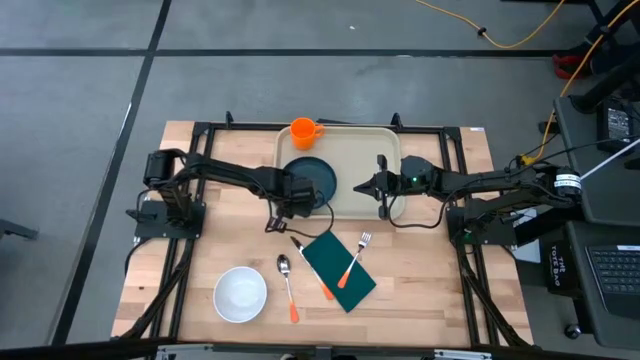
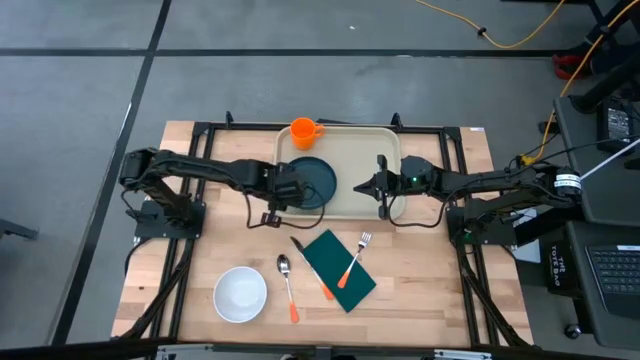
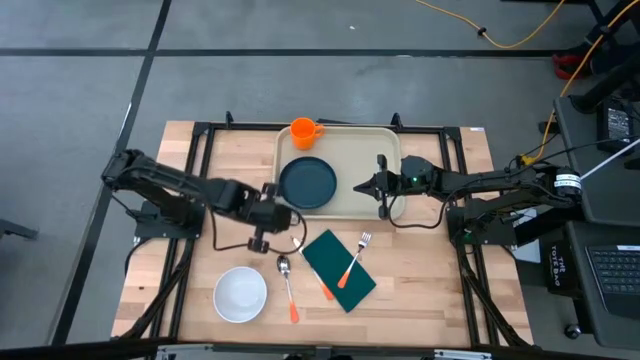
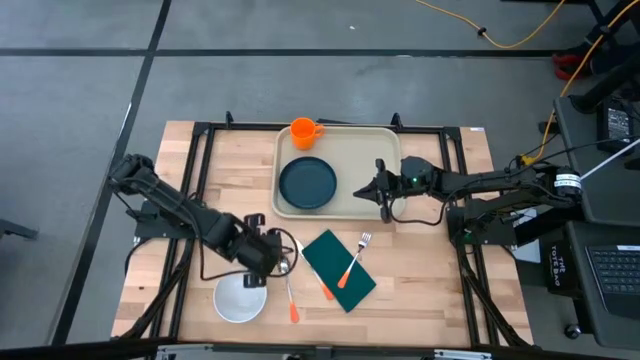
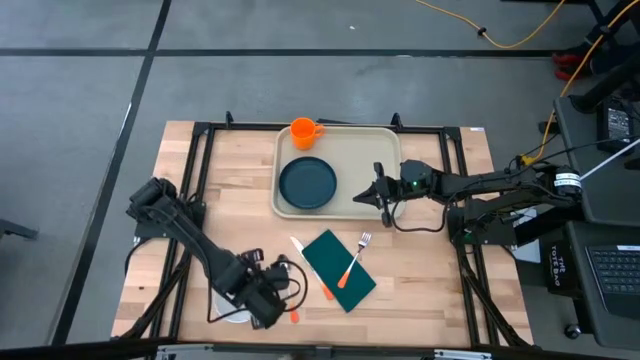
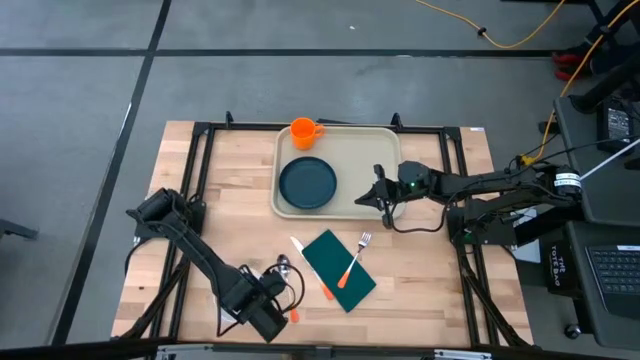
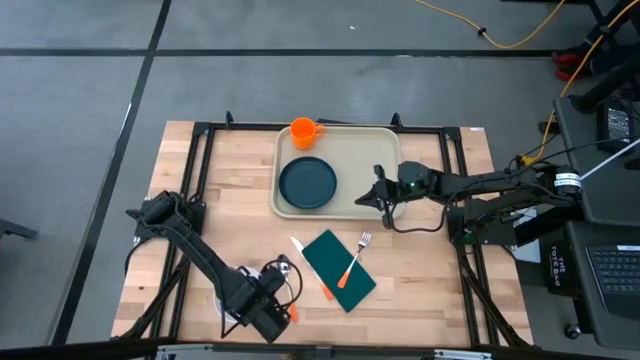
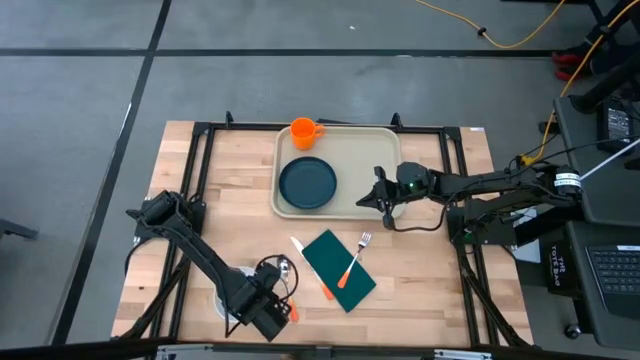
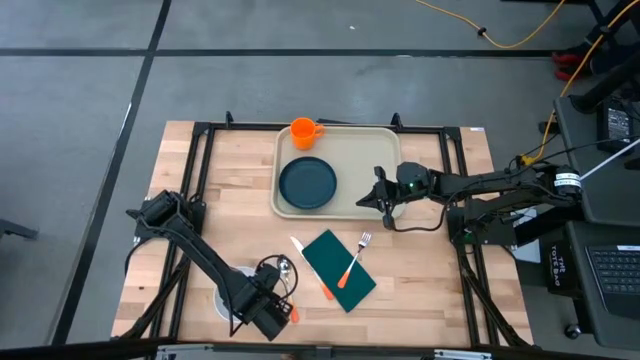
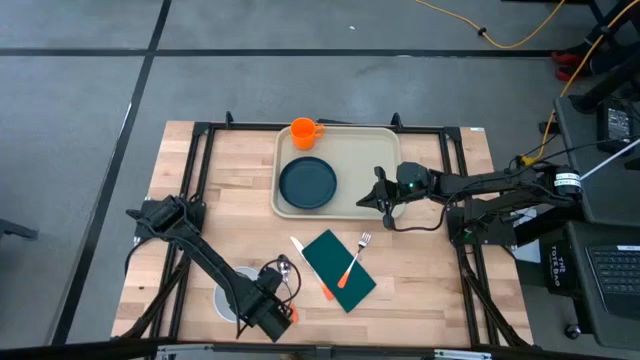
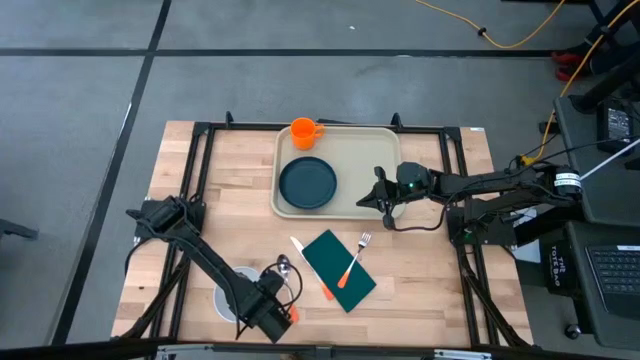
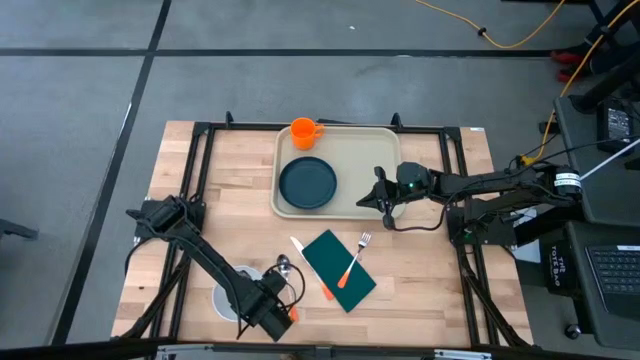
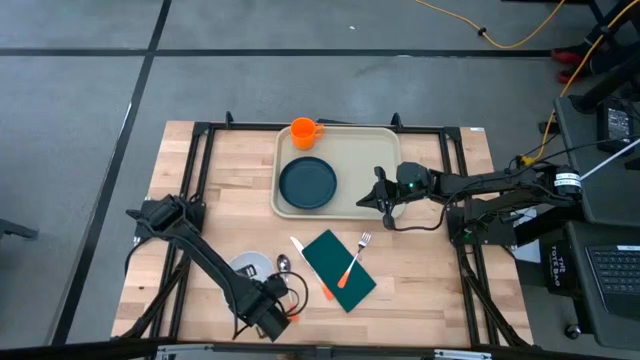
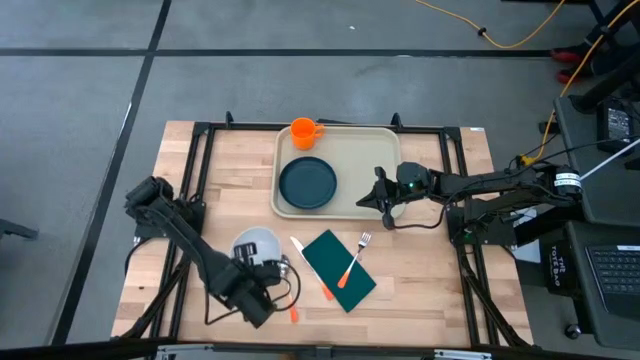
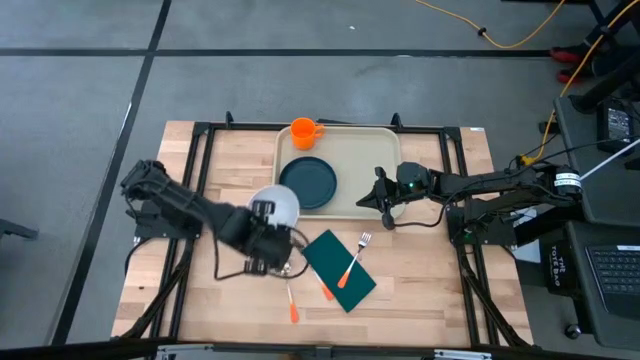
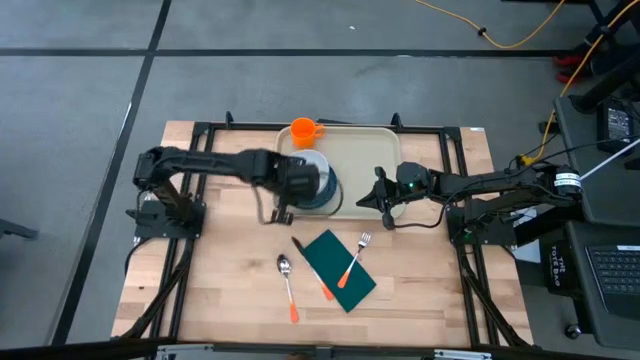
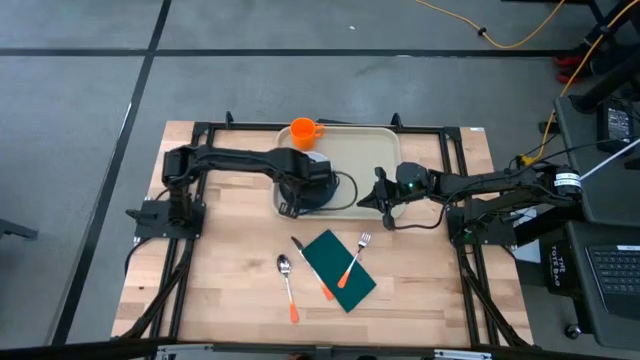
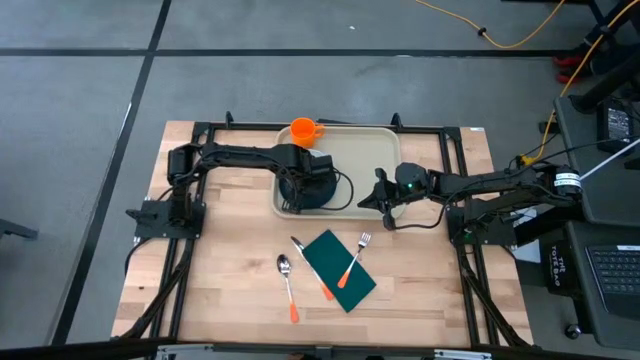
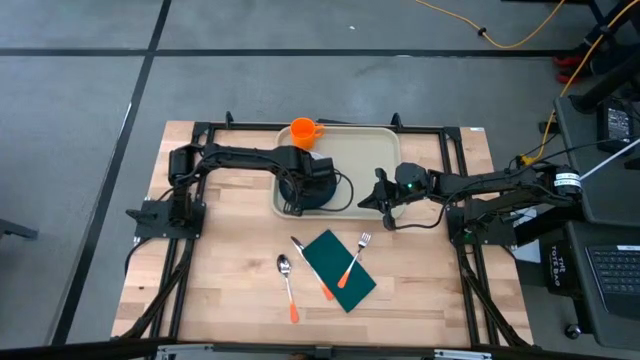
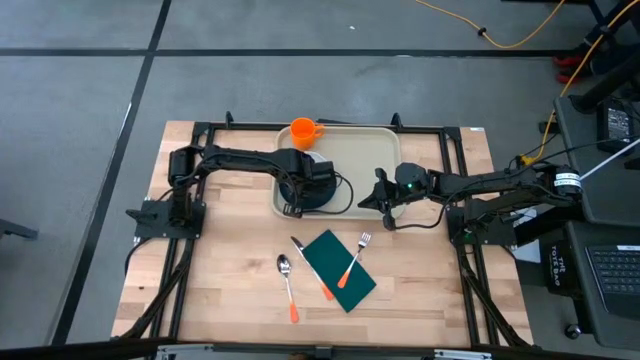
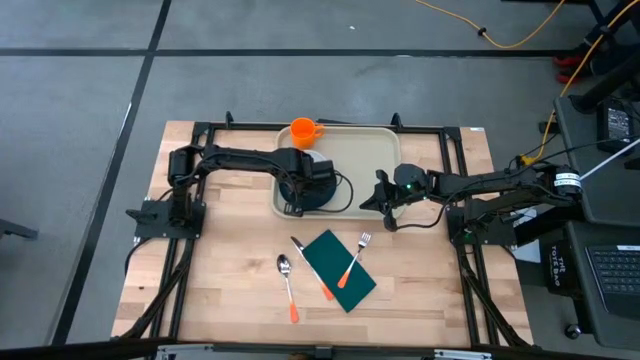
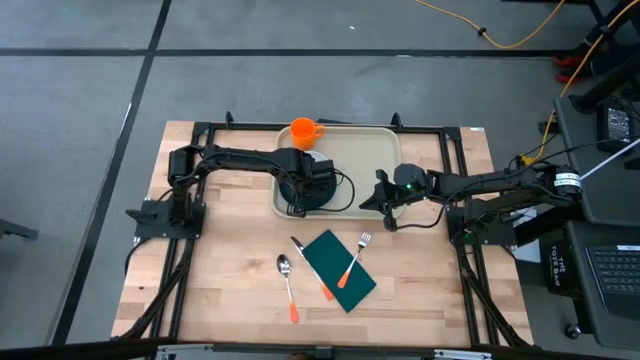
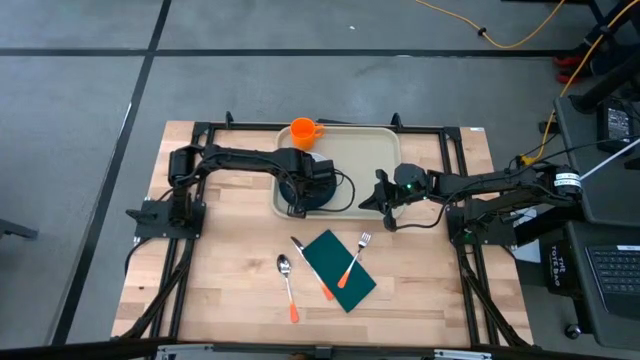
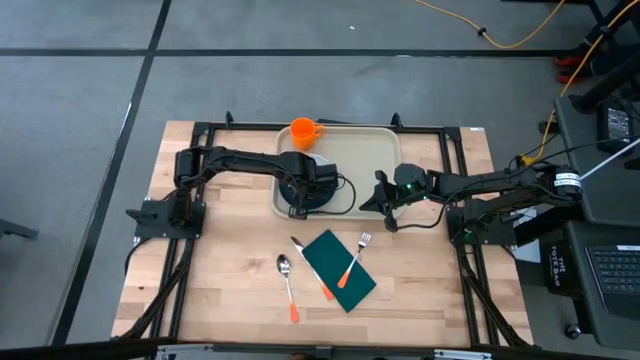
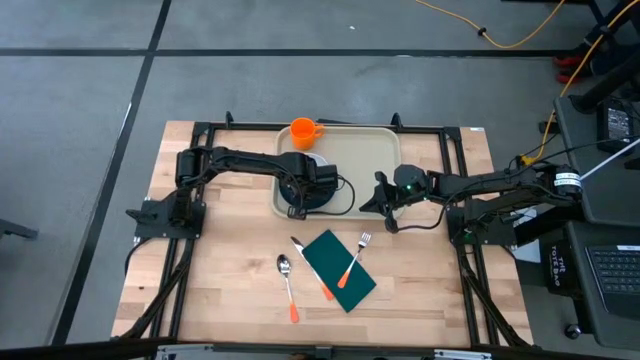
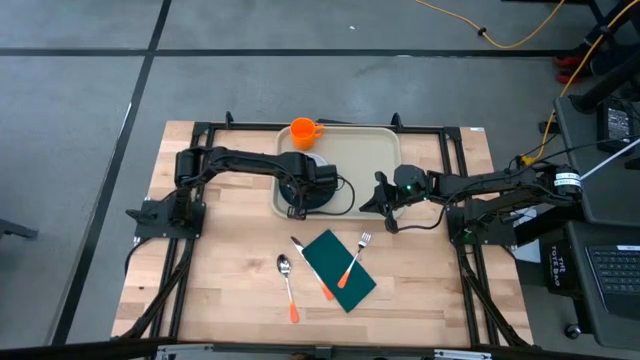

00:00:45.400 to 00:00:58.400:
Task: Set up tray
Stack the white bowl on top of the blue-green plate on the gray tray

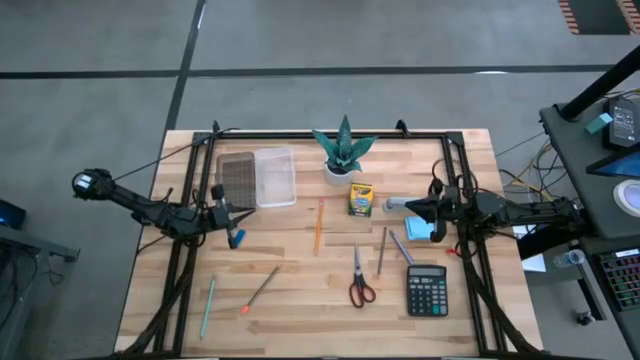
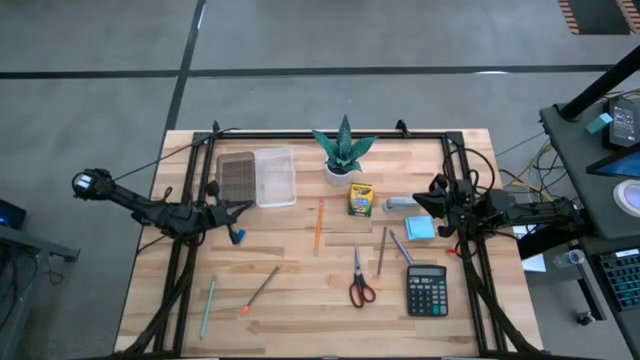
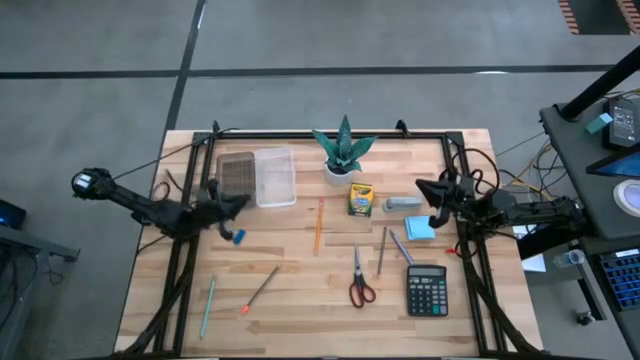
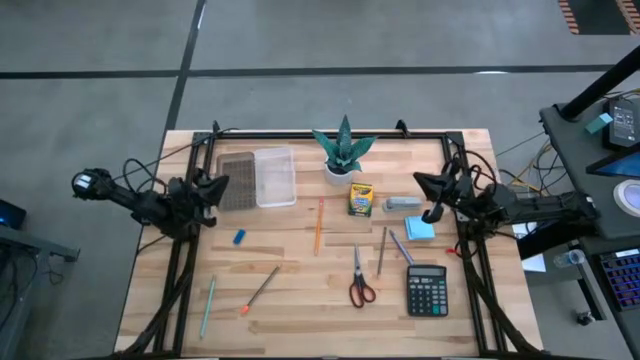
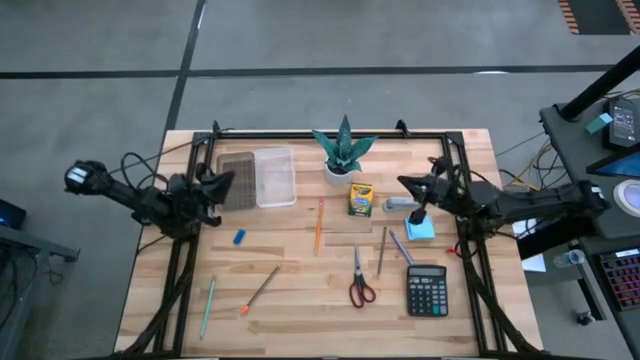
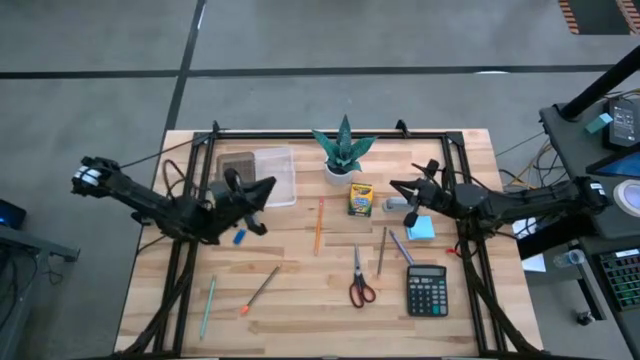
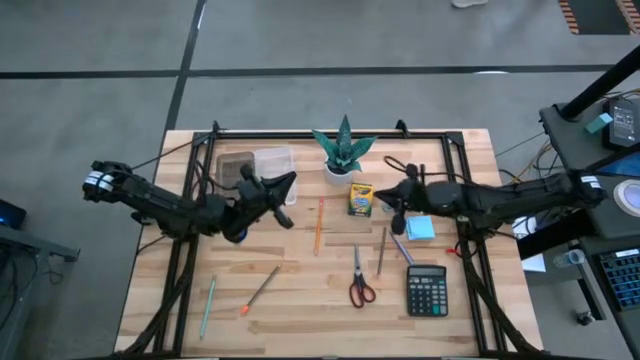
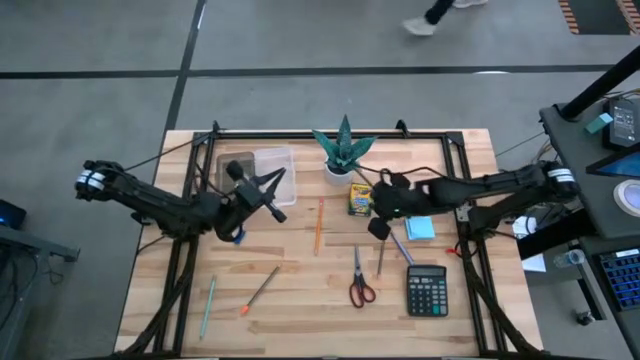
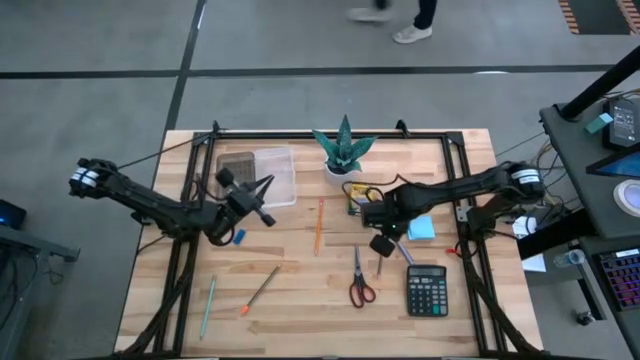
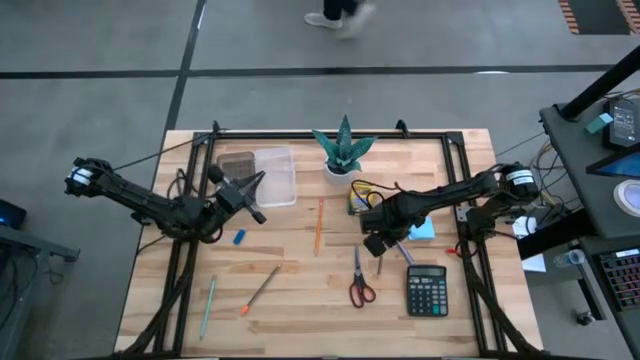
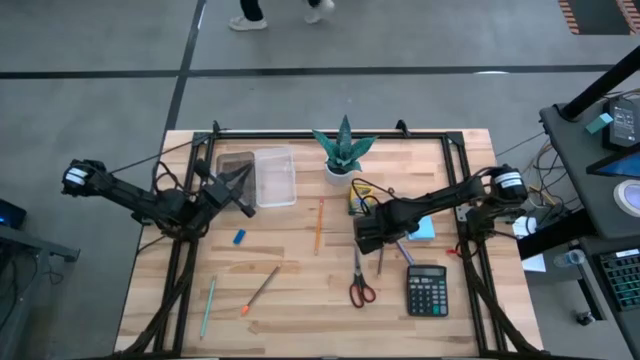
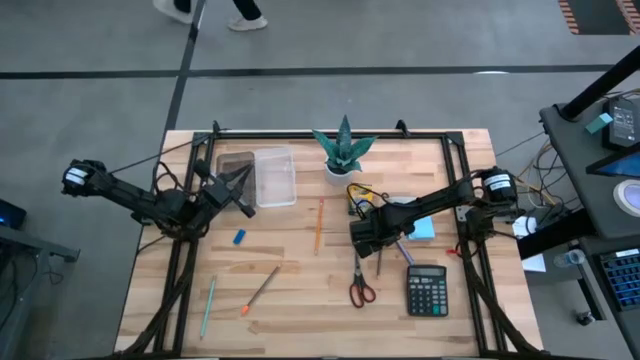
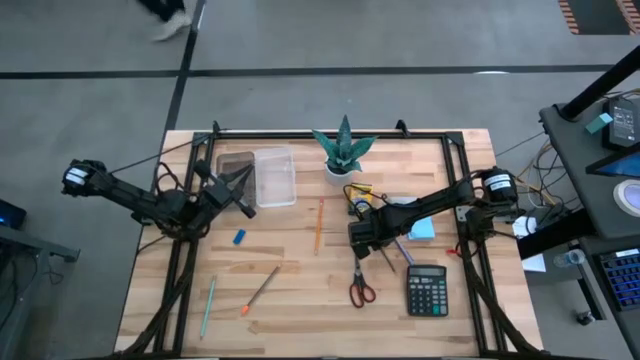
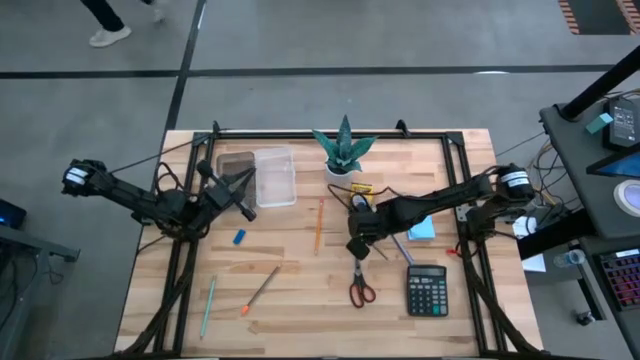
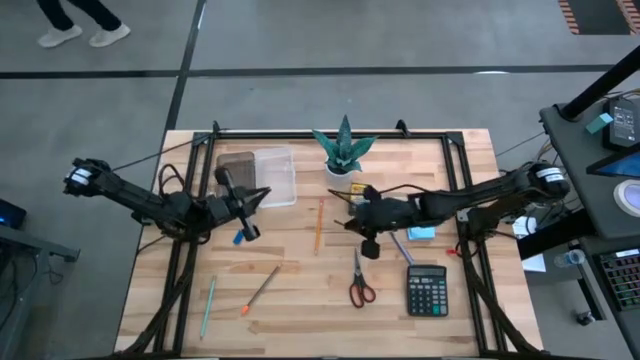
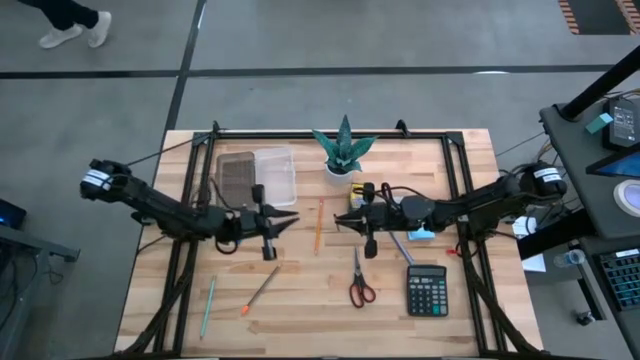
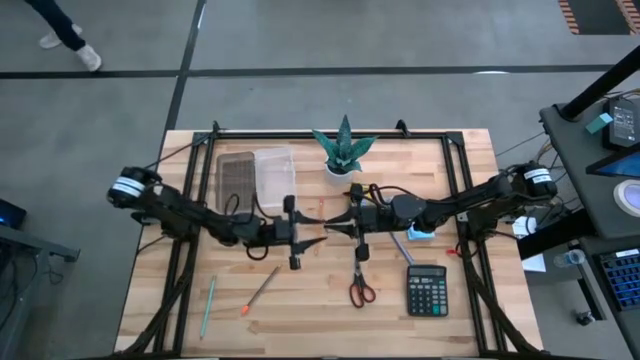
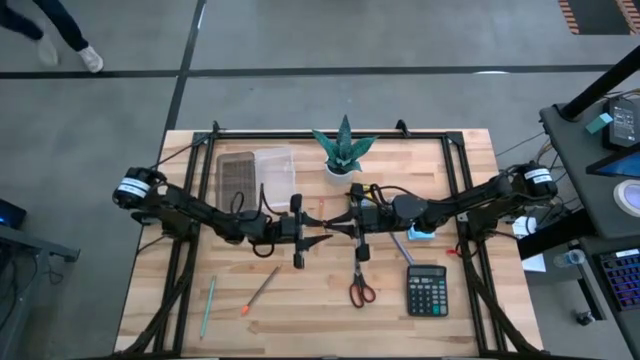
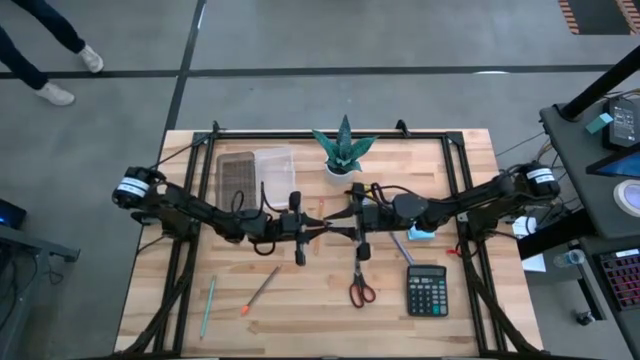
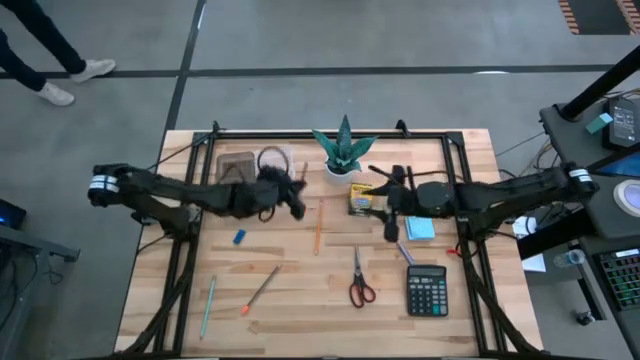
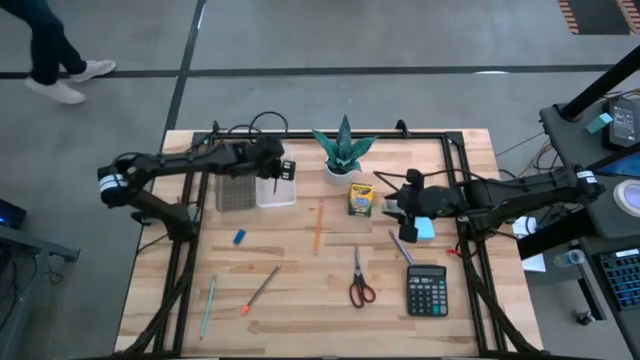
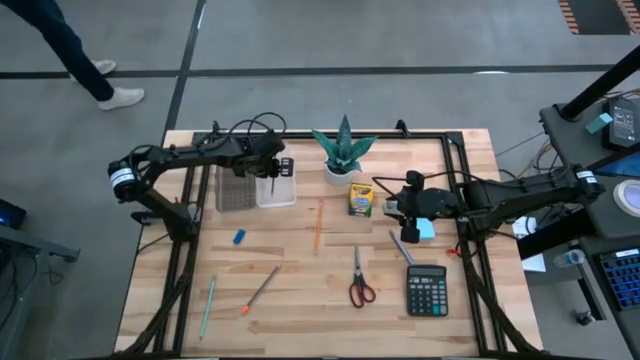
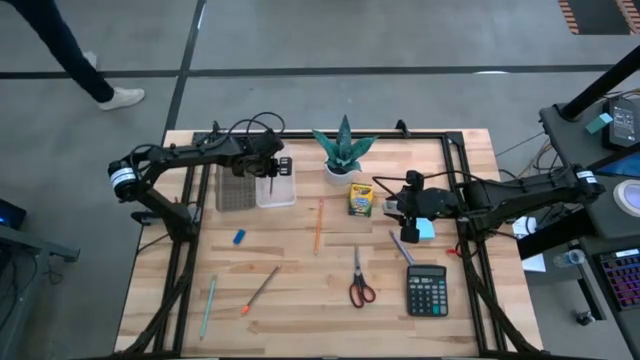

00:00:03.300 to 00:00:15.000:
Task: Pack school essentials
Put the right black pencil into the black supply box
